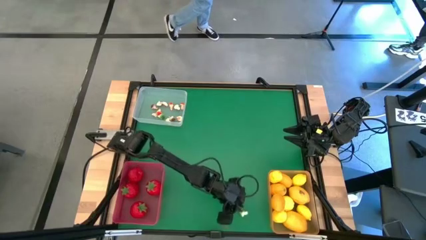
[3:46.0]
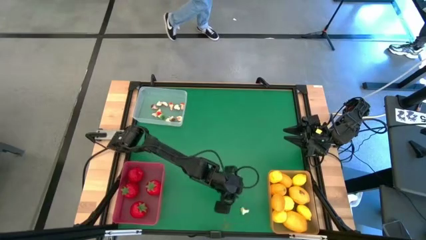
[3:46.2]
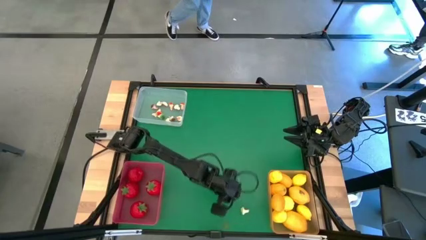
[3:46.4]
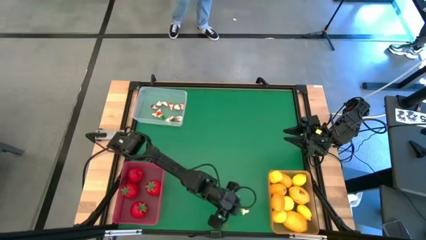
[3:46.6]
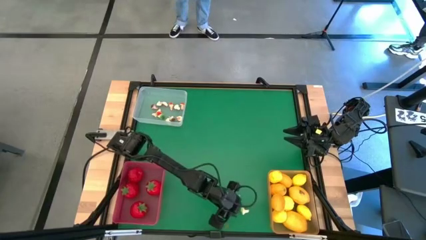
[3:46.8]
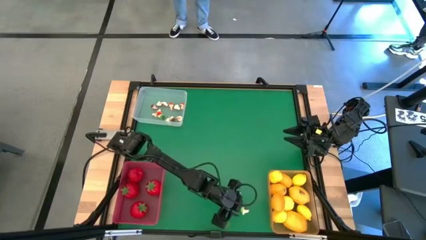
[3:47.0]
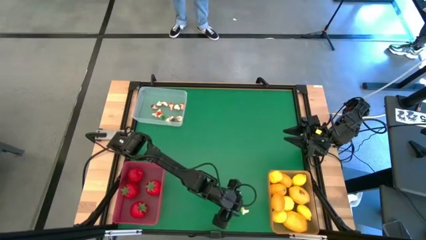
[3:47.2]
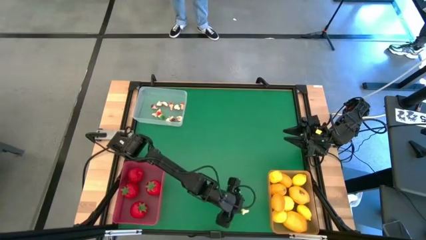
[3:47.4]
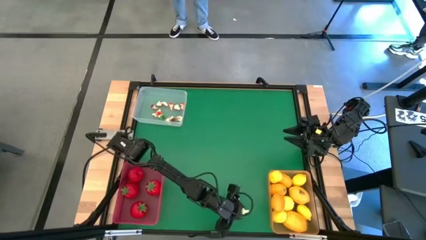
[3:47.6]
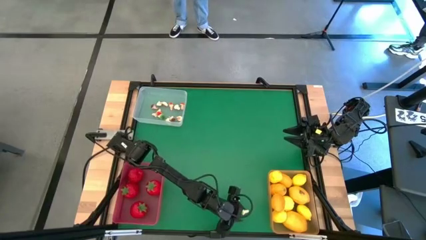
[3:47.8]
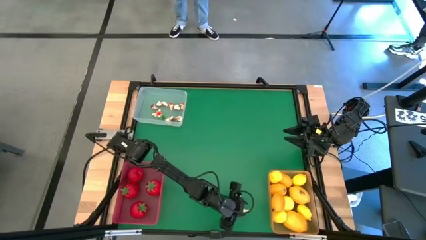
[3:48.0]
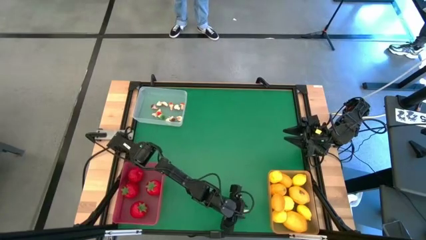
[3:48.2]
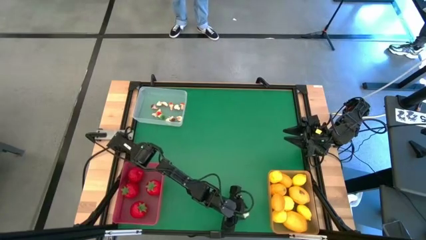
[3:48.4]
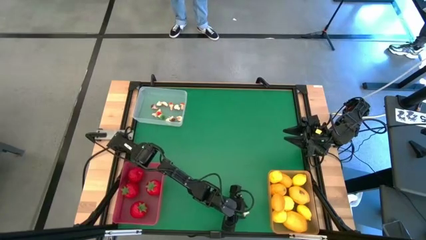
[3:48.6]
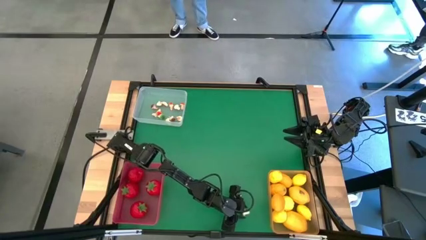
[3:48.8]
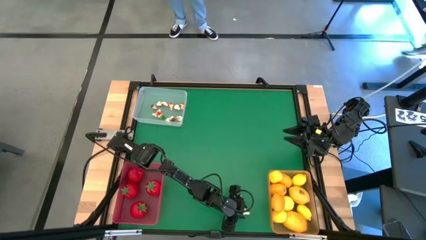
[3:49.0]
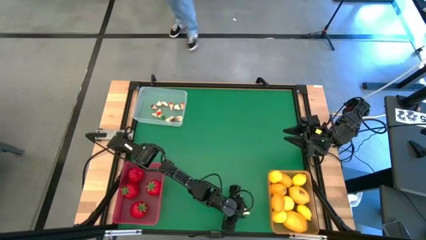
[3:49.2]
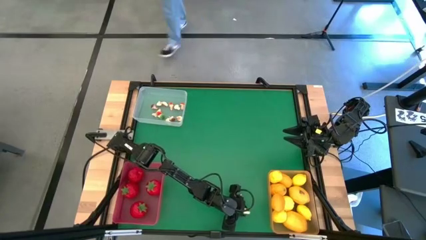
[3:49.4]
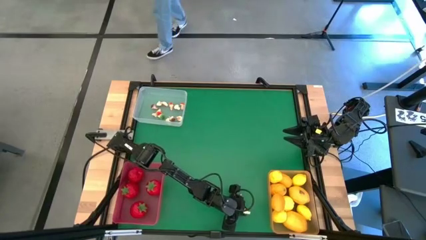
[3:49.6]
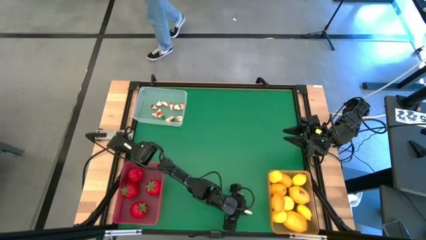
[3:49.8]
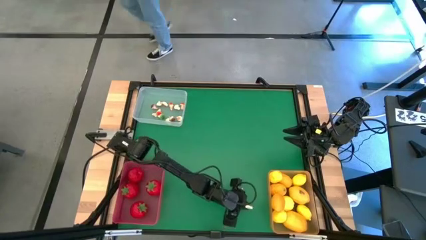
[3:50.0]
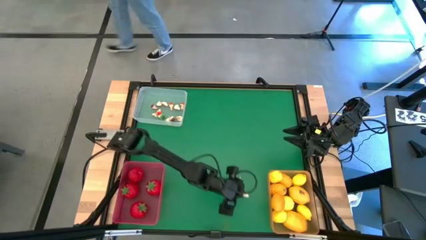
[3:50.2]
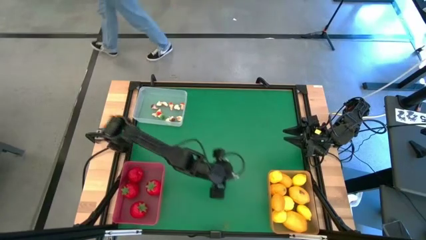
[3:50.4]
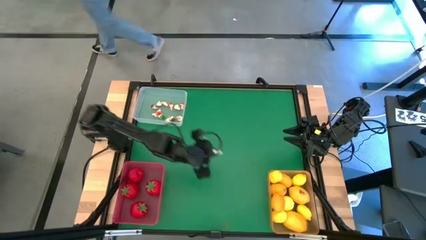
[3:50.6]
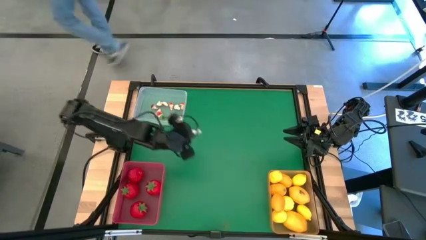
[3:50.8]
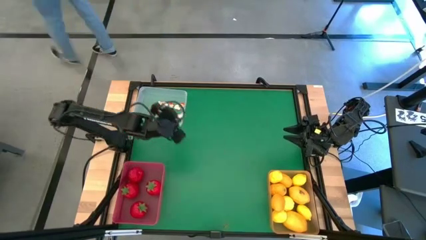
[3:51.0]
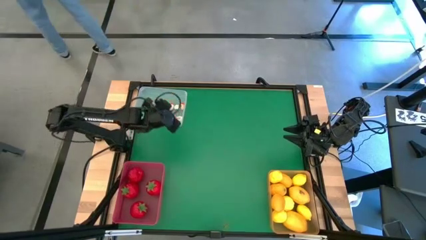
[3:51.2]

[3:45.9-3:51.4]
Task: Sort produce into baskets
Put the green mushroom into the white bin

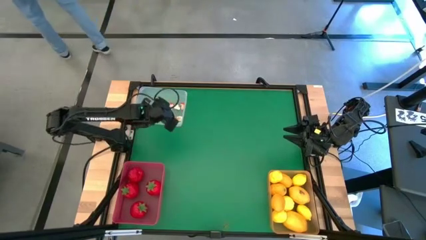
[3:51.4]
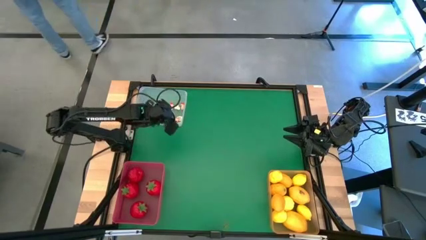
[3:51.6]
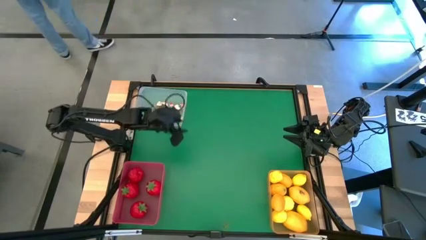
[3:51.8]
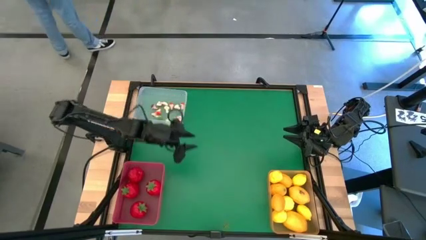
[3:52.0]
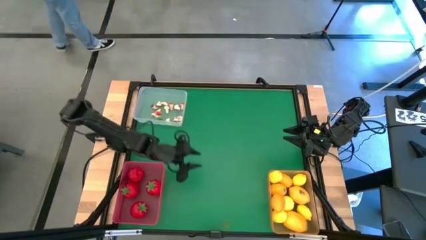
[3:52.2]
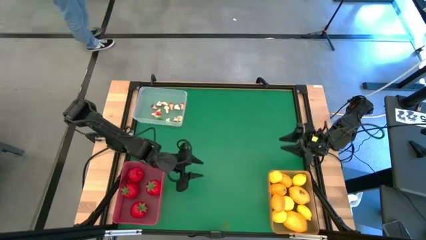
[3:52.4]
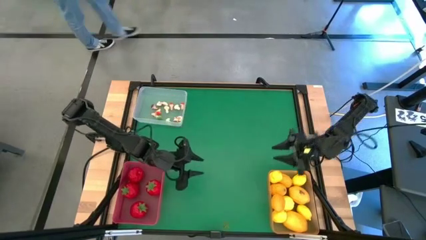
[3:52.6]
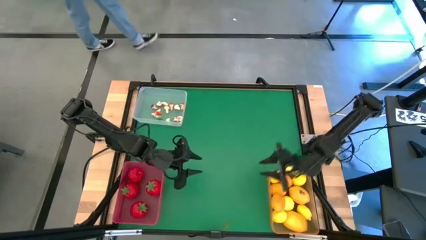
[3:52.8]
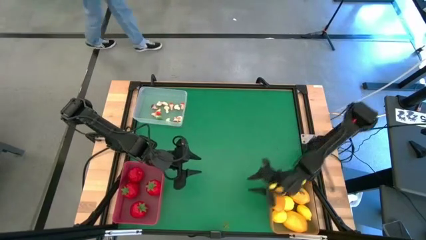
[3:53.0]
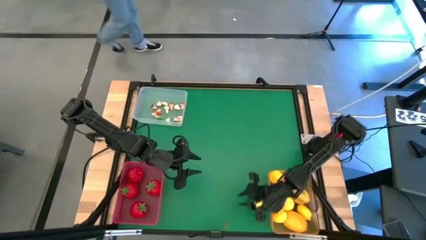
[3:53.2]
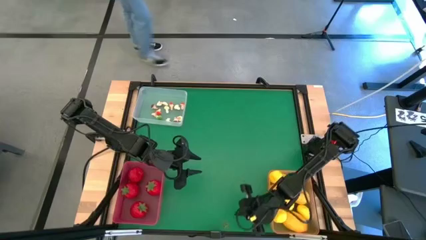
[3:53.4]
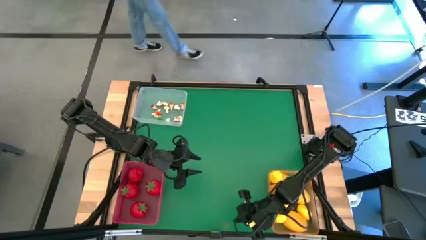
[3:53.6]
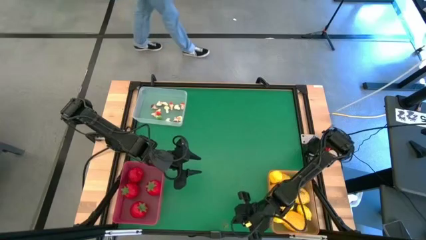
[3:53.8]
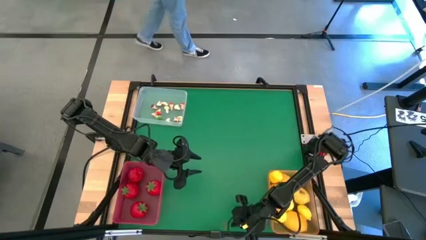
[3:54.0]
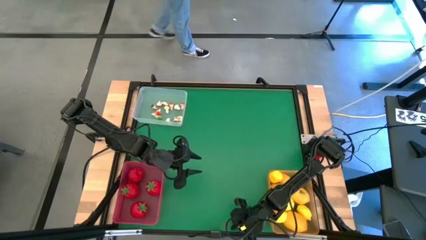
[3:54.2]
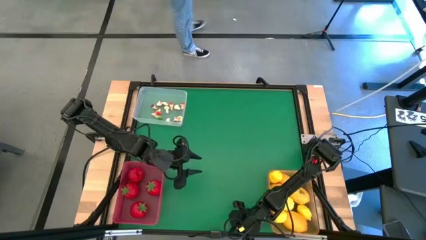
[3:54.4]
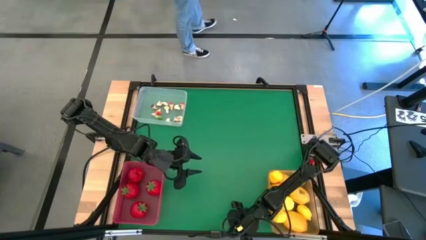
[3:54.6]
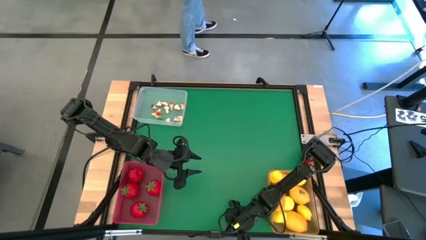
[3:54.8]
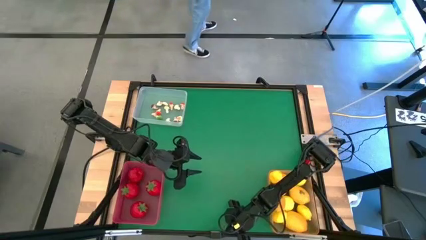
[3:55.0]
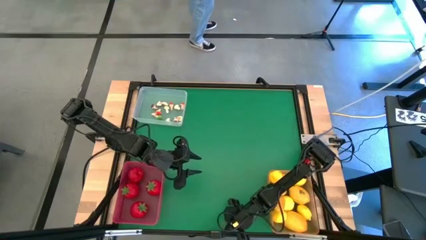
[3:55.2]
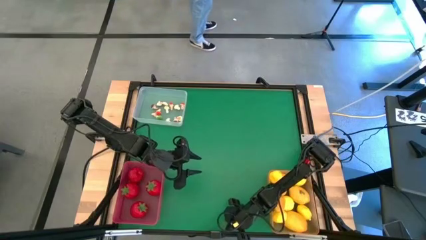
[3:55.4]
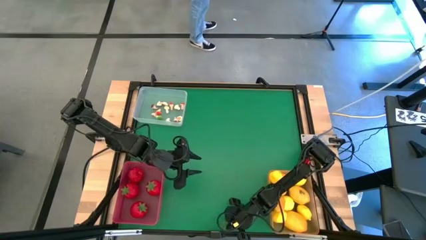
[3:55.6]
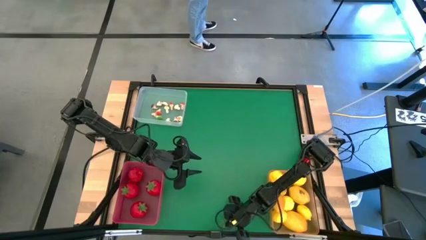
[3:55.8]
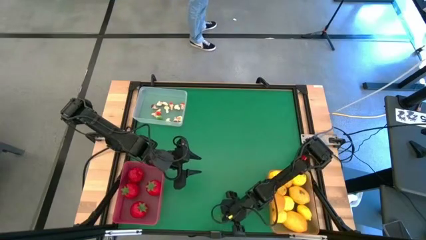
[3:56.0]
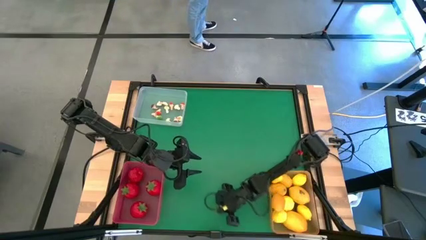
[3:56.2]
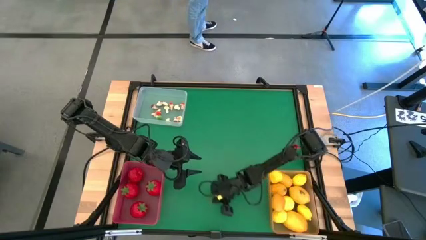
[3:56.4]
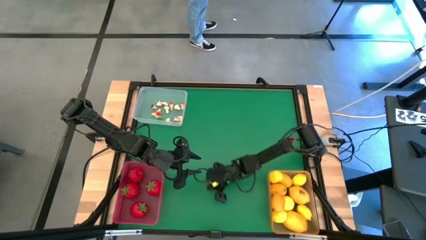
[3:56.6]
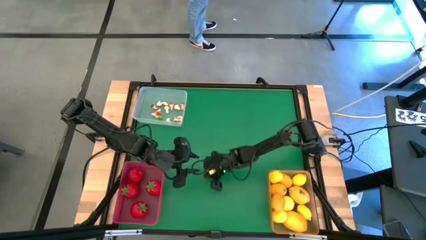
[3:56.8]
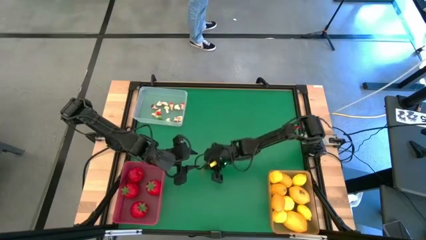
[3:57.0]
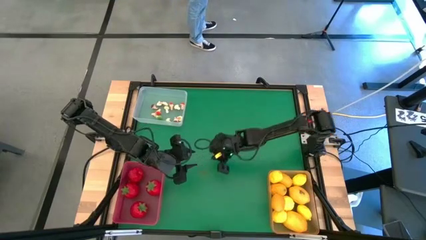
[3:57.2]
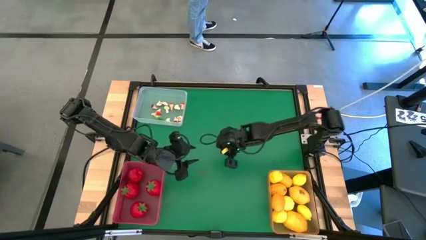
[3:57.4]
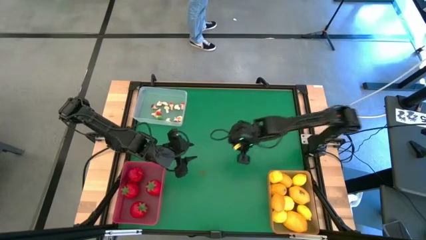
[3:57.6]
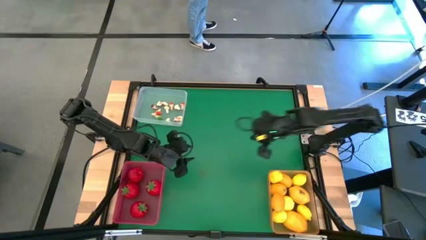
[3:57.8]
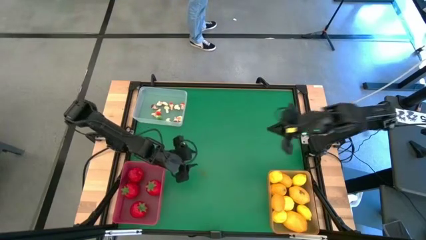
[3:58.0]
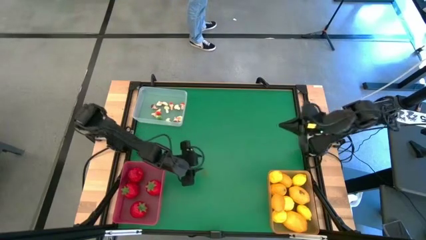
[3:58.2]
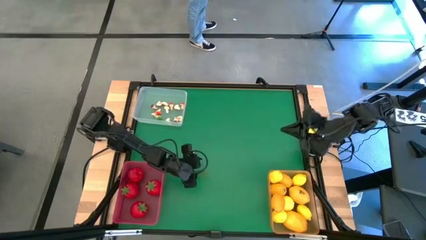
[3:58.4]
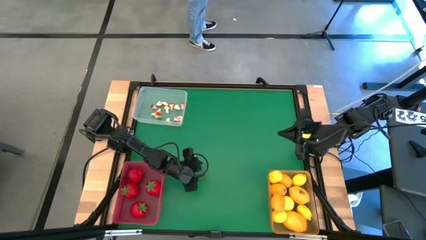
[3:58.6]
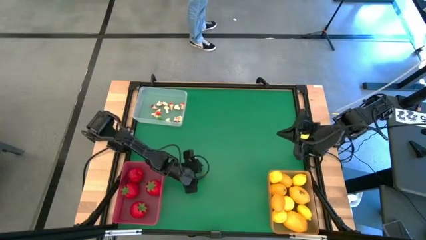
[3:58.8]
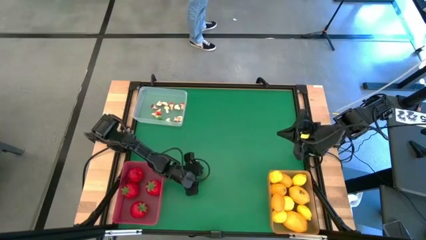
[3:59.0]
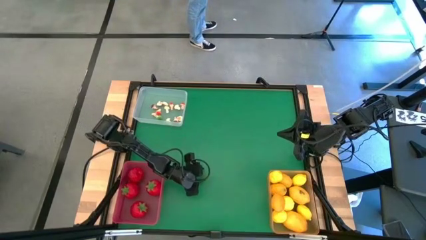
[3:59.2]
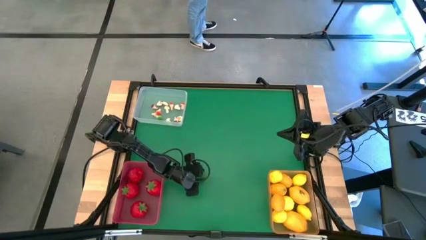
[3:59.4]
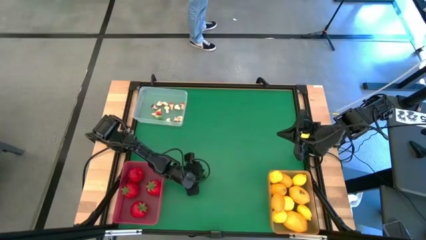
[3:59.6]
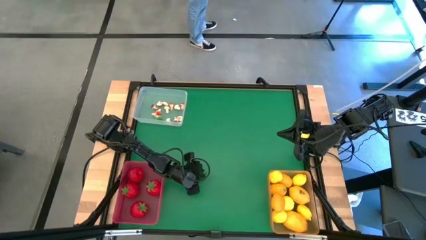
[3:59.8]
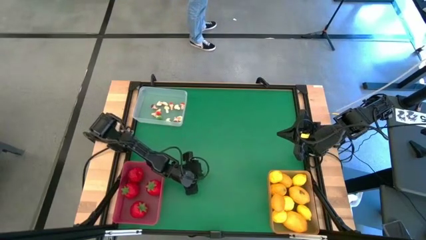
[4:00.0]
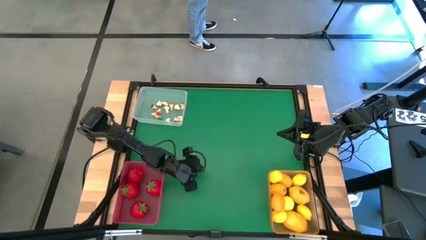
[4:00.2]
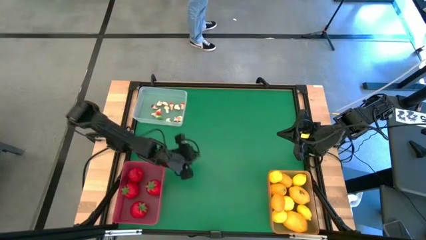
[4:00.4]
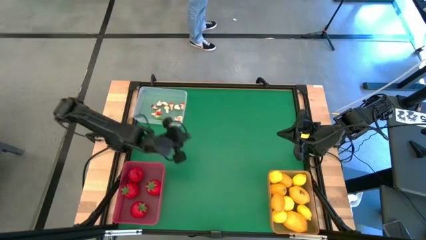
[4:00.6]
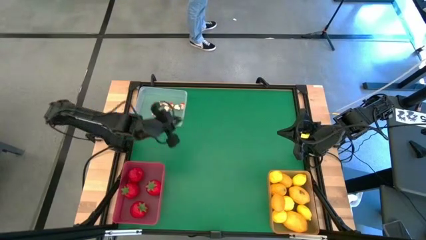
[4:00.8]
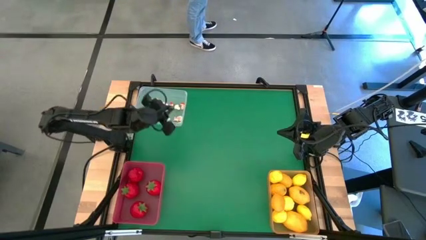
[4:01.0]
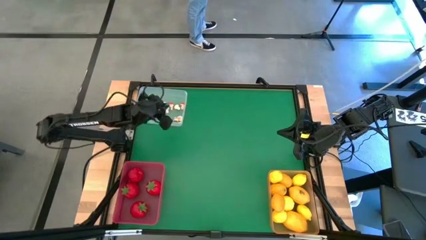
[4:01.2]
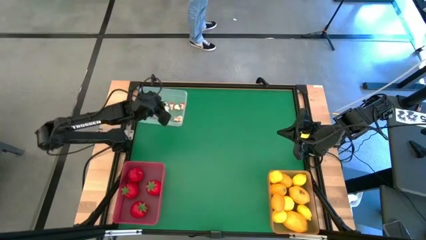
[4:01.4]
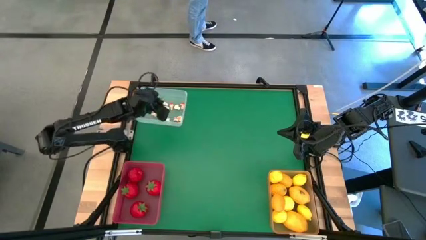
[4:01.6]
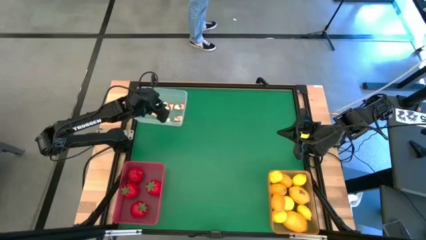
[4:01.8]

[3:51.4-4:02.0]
Put the green leaf into the white bin
